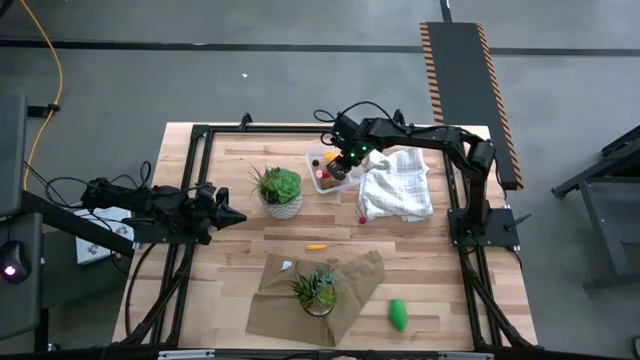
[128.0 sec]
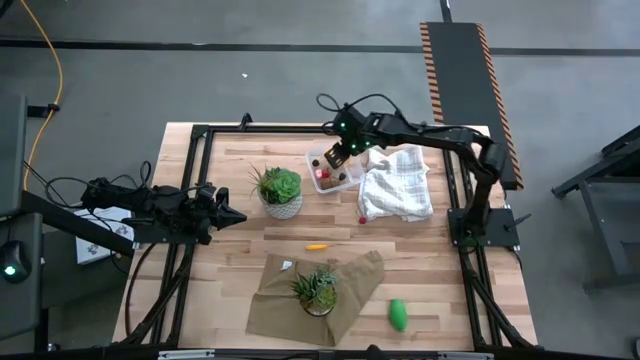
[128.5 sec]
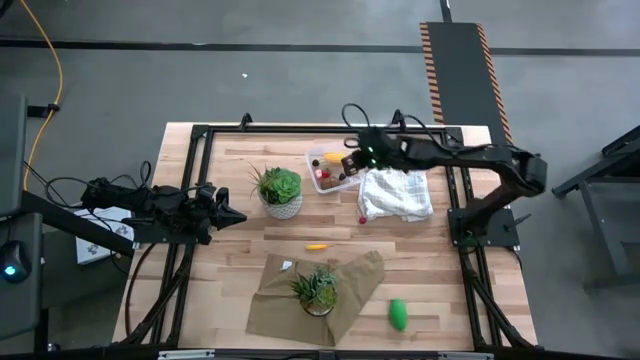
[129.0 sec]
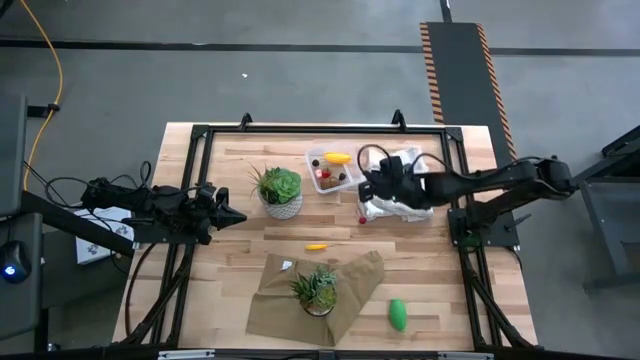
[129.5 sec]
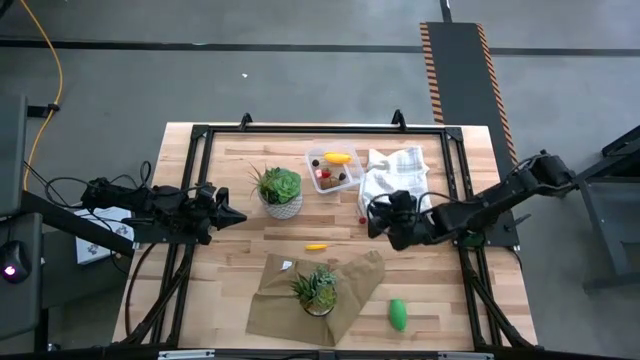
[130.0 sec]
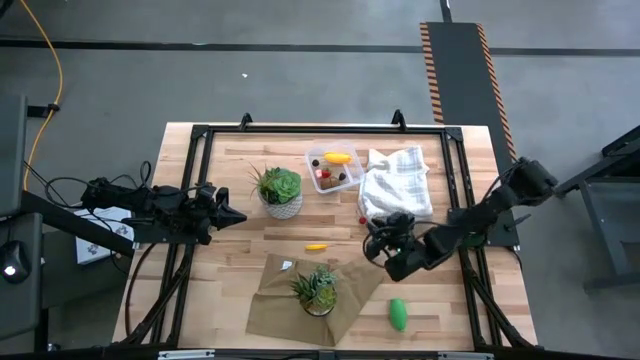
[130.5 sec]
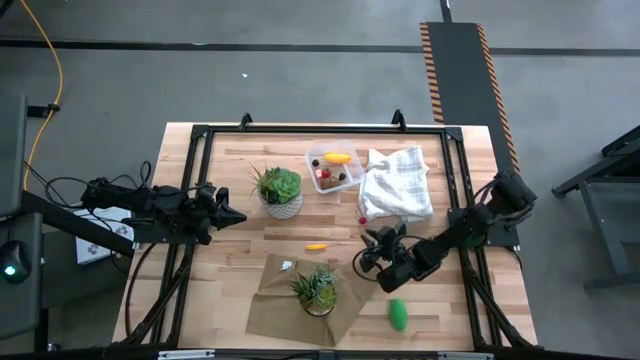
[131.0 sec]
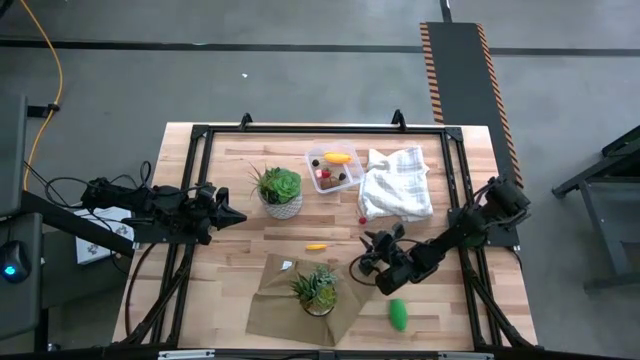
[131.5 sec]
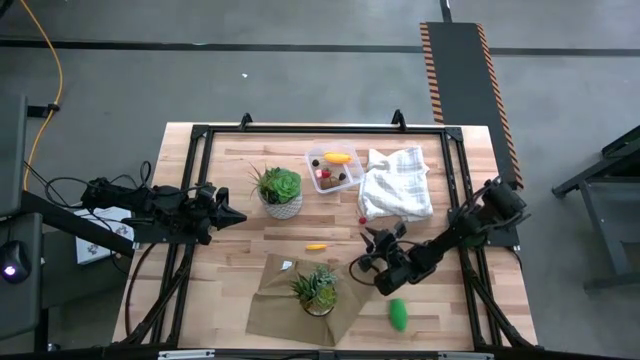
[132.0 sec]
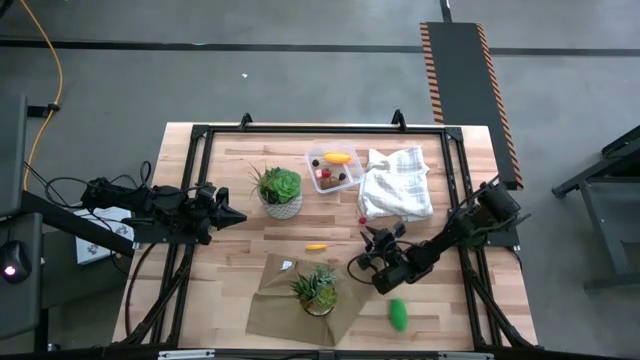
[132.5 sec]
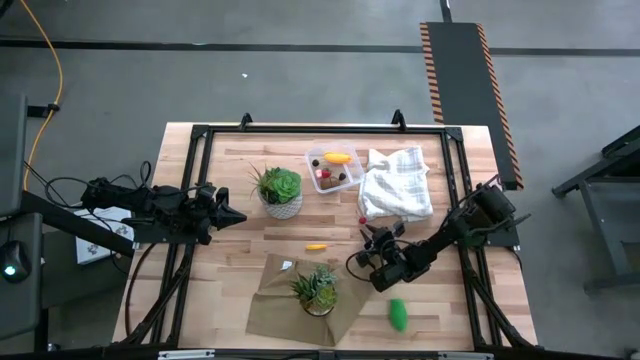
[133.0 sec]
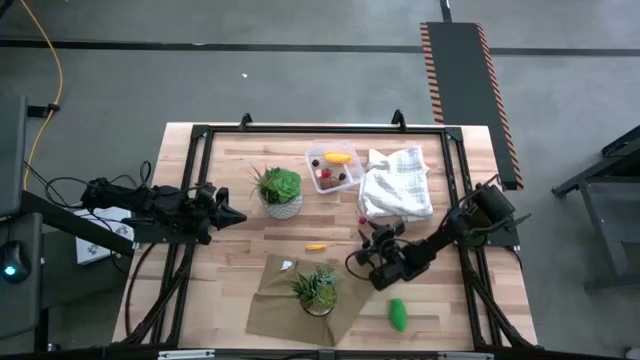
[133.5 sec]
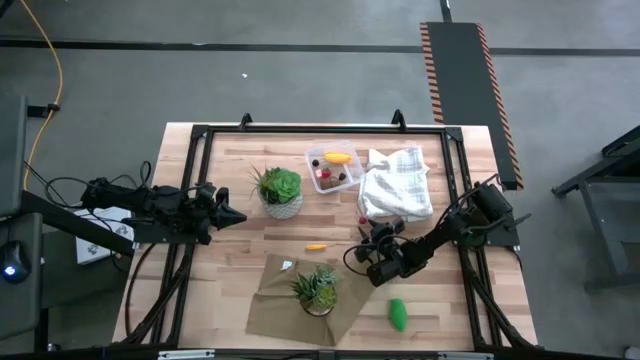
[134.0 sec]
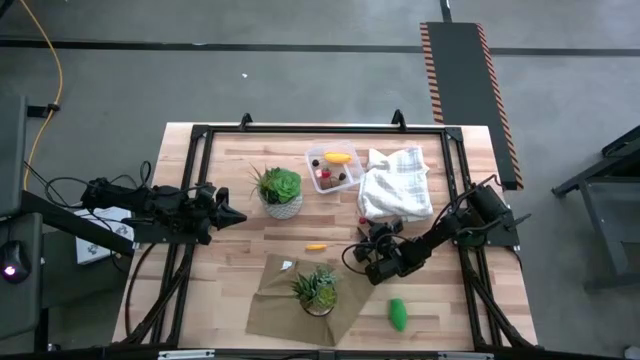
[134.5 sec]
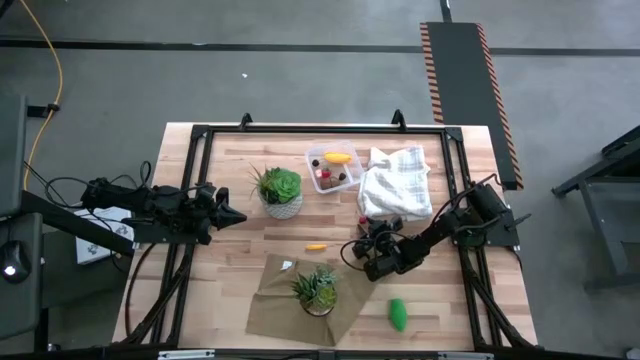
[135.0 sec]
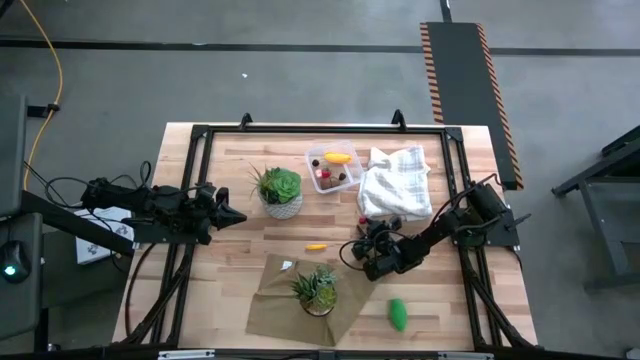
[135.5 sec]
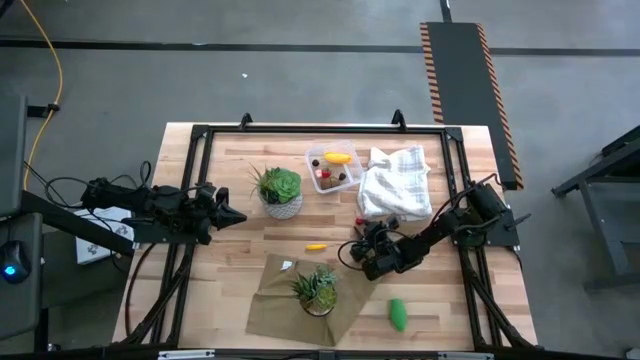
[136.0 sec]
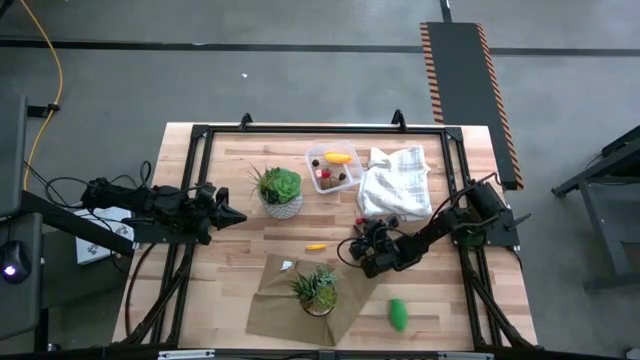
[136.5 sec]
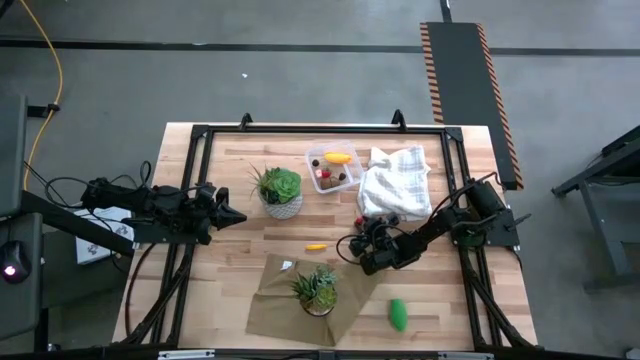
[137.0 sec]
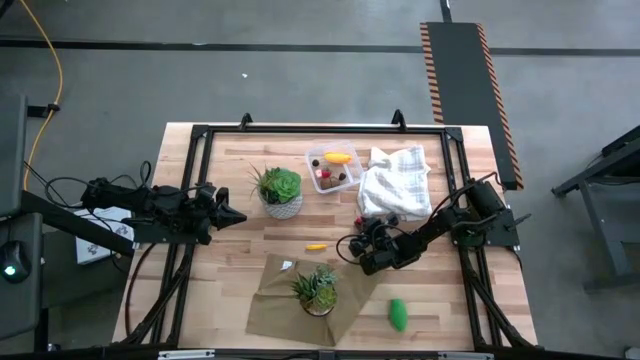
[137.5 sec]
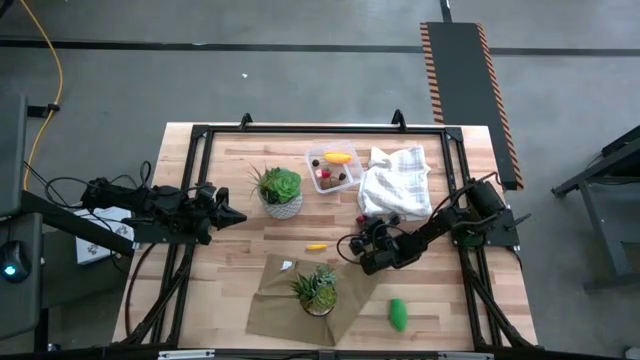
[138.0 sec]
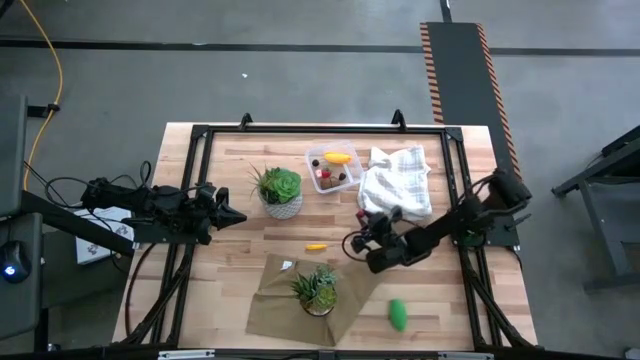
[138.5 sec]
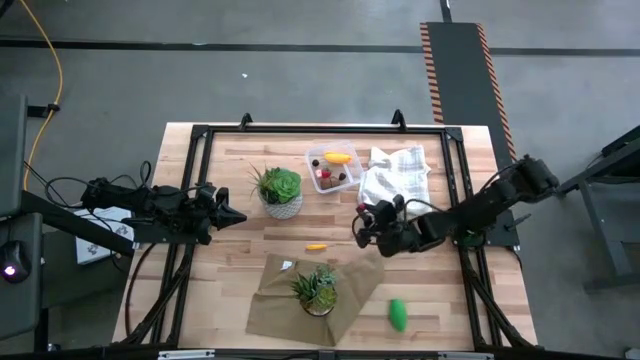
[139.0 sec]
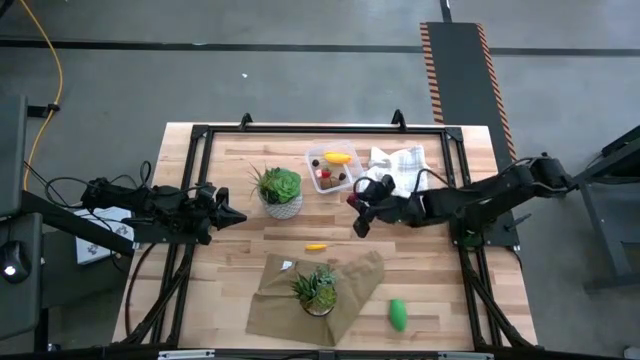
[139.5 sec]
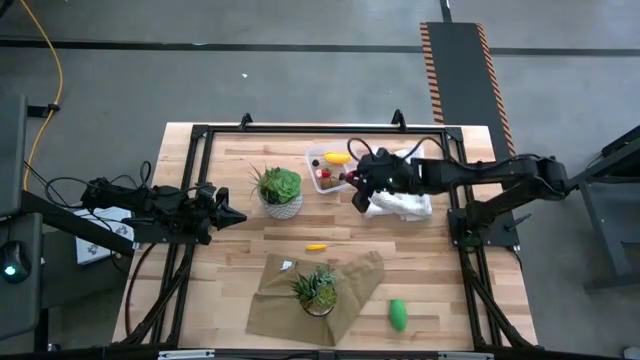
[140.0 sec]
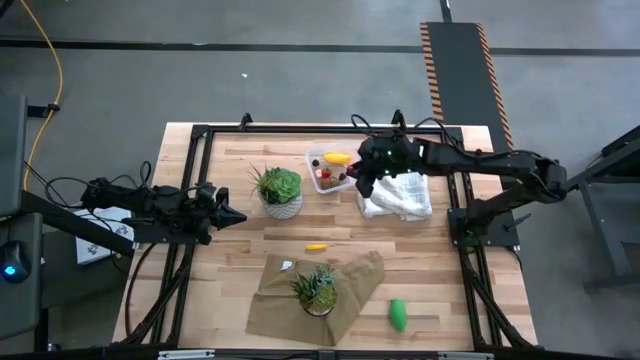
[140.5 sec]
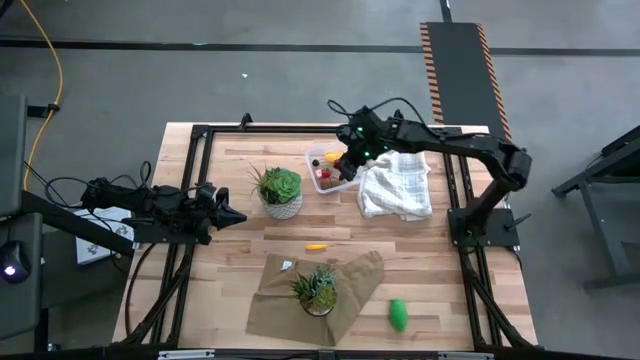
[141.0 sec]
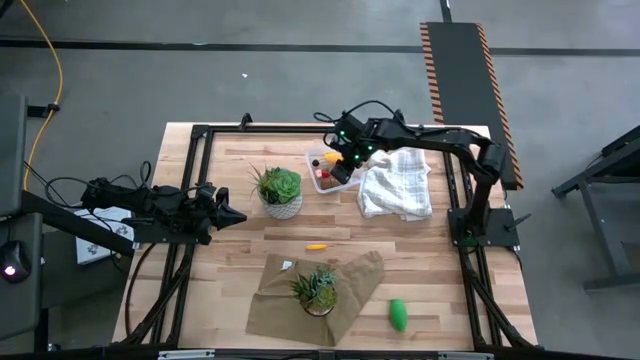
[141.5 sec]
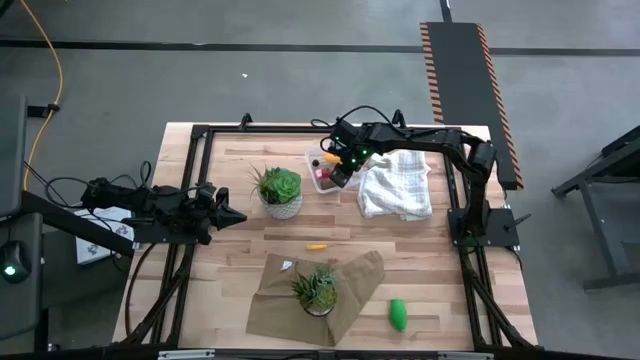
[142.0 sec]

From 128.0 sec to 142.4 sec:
Task: Pick and placing Produce into tupperware
Put the red cherry into the transparent bin

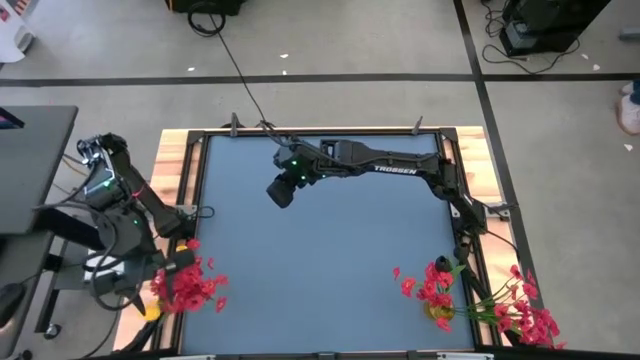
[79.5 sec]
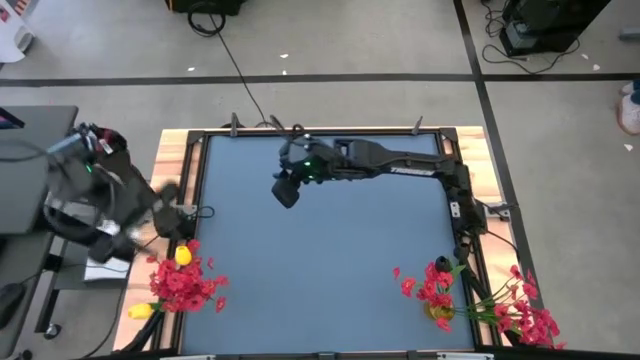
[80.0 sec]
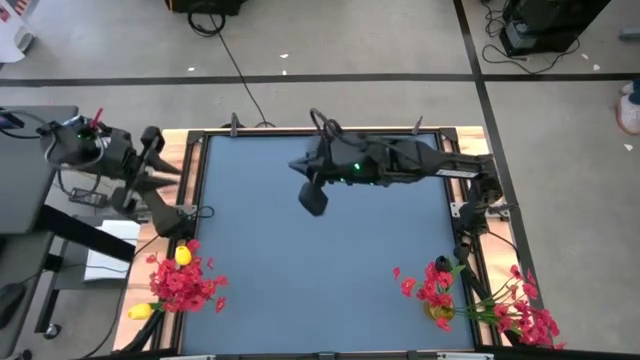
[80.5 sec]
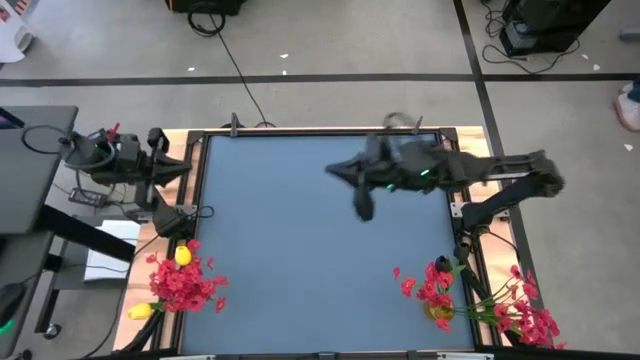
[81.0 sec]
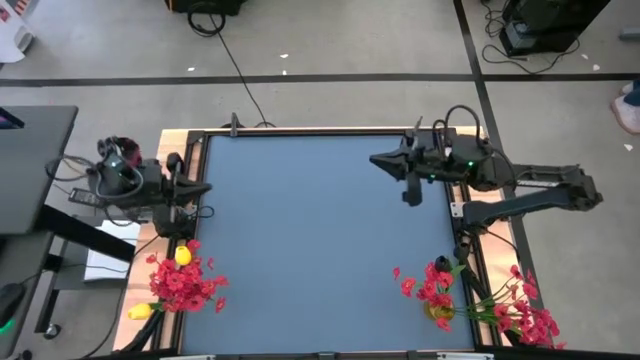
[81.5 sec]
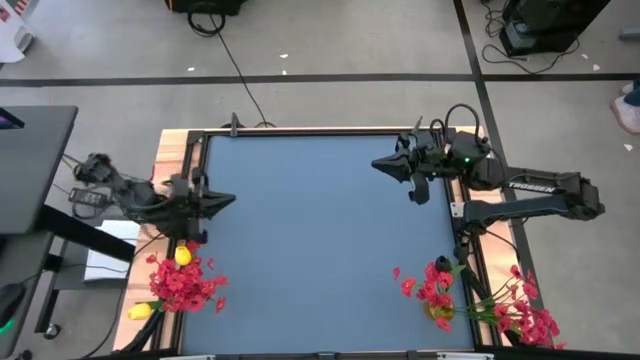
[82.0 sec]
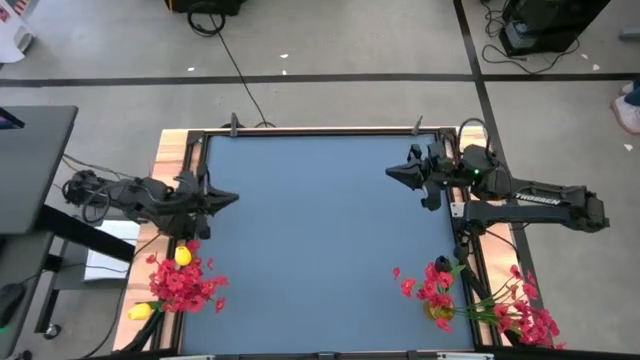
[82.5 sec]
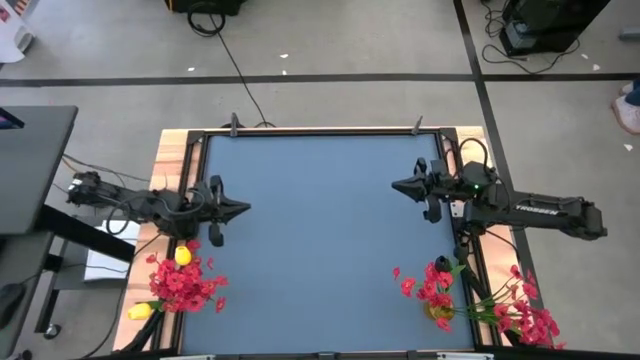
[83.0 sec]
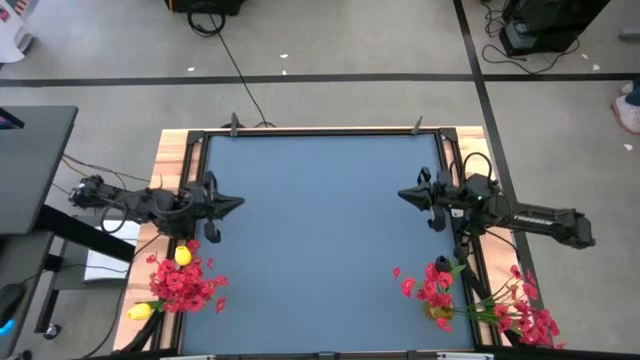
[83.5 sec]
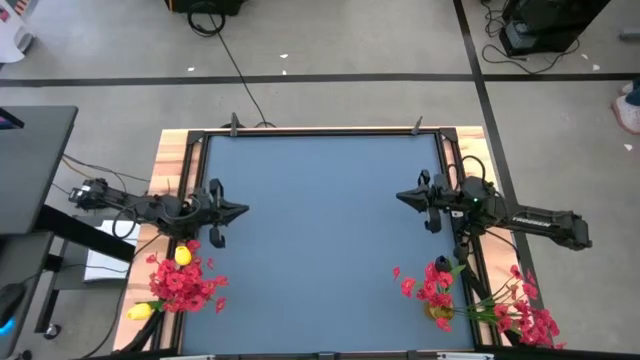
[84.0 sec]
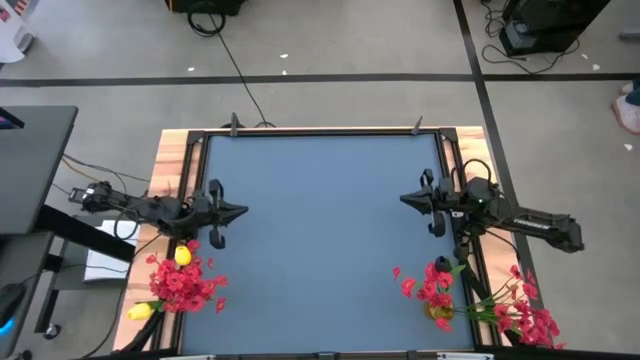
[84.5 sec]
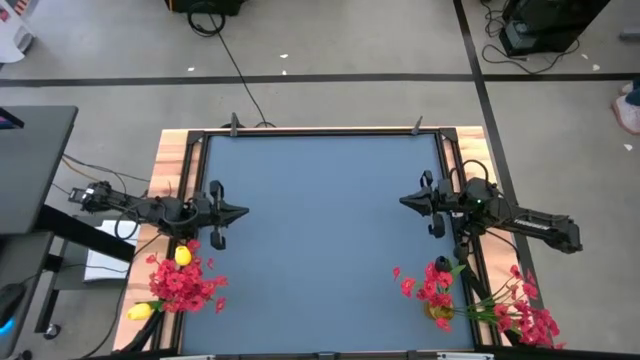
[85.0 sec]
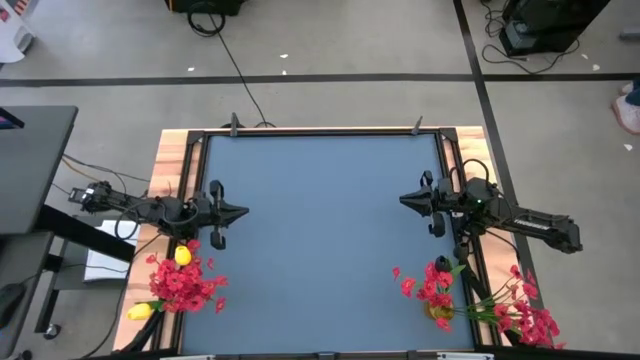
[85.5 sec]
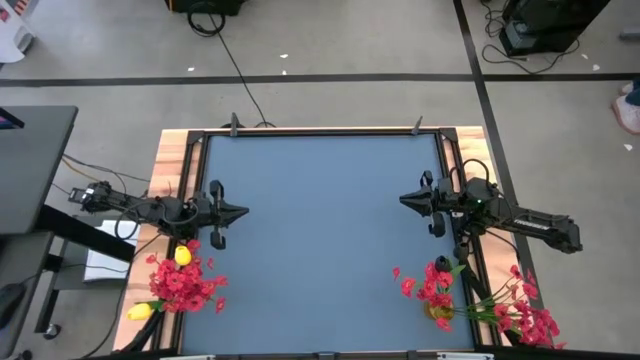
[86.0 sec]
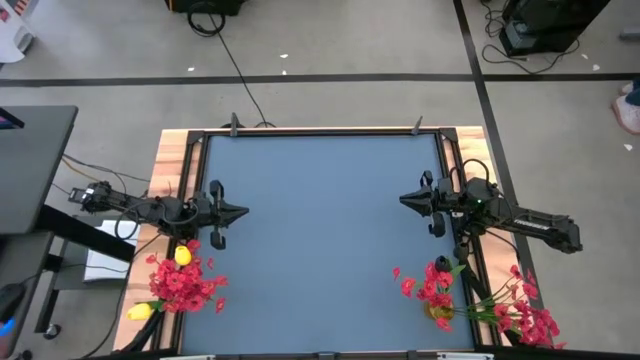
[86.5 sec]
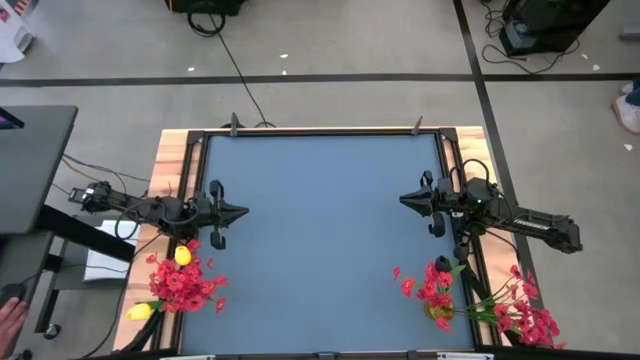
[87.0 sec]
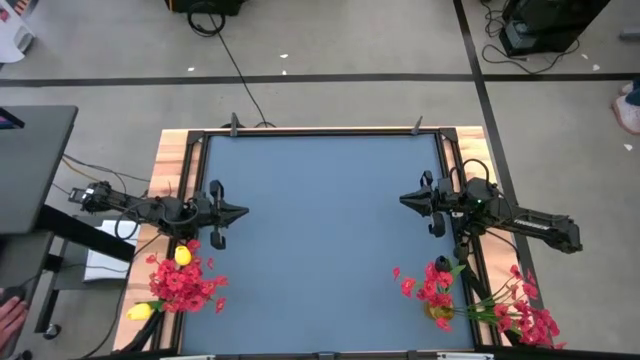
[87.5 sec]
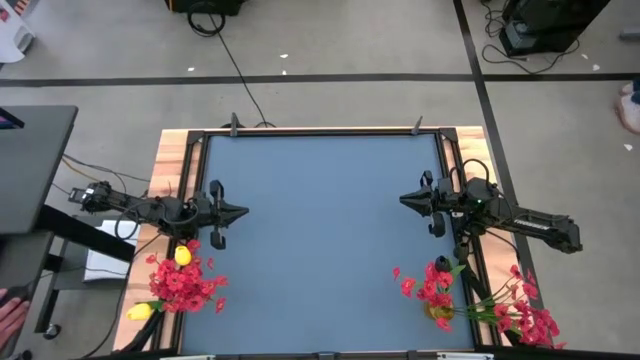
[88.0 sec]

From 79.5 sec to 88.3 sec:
Task: Sort flowers into vase by color
Return to Home Position
